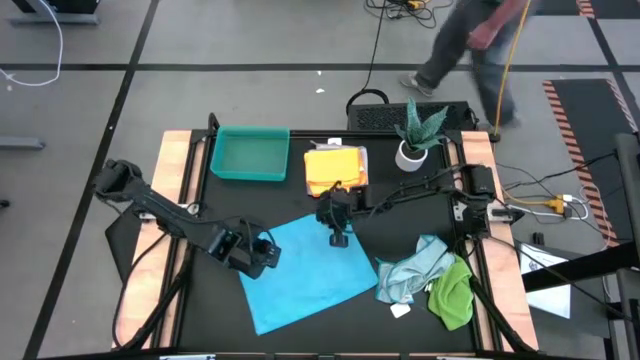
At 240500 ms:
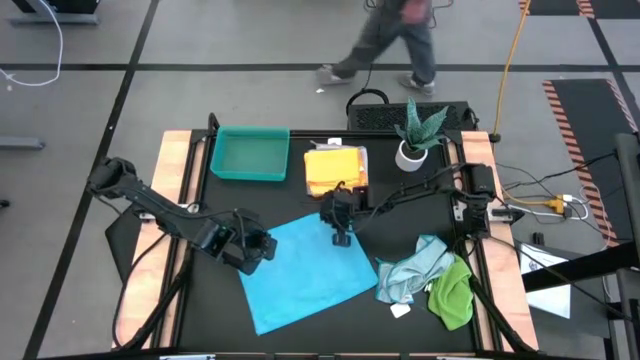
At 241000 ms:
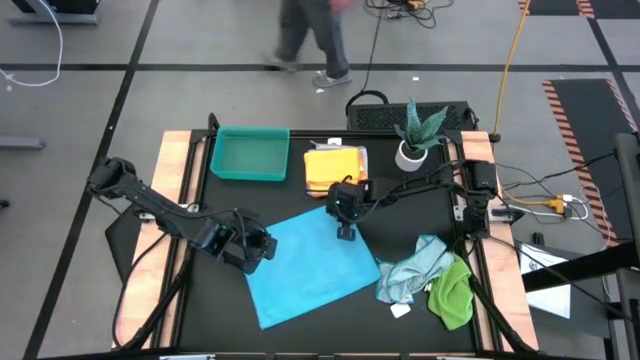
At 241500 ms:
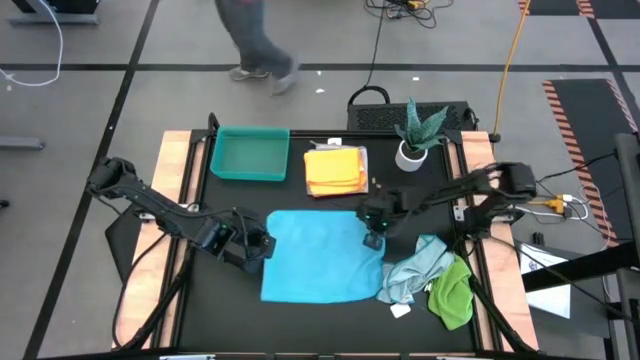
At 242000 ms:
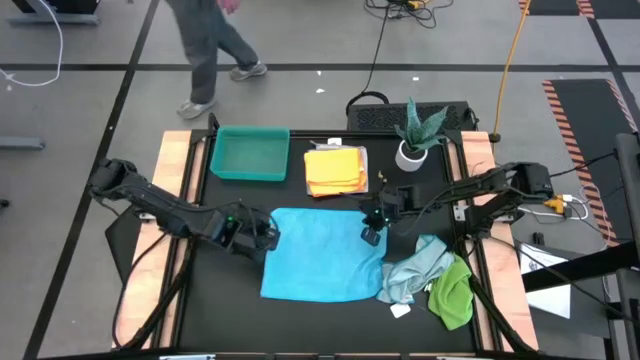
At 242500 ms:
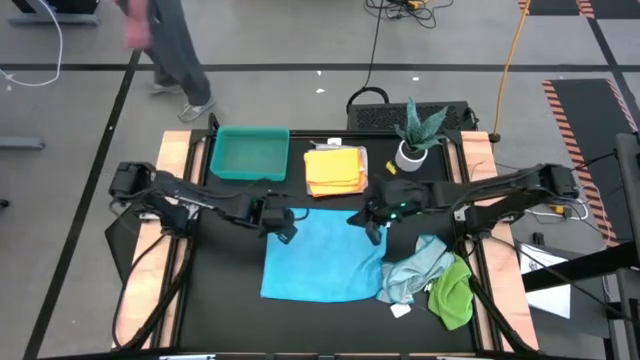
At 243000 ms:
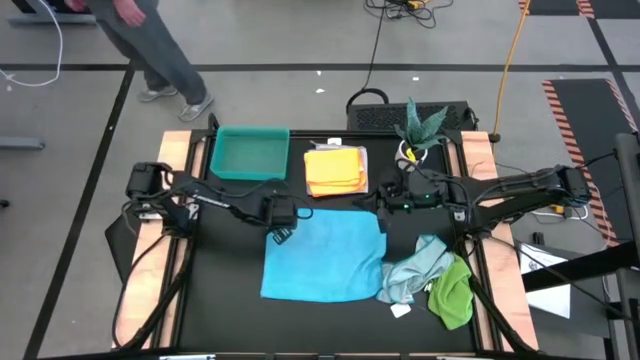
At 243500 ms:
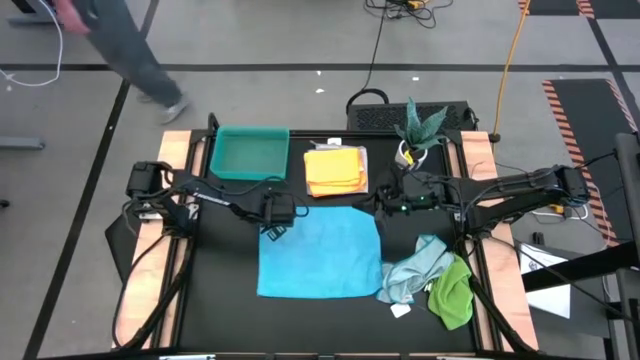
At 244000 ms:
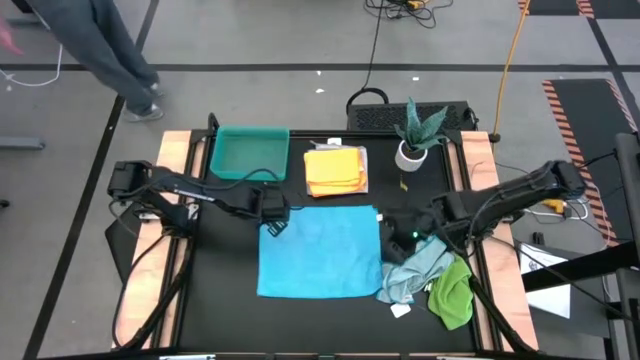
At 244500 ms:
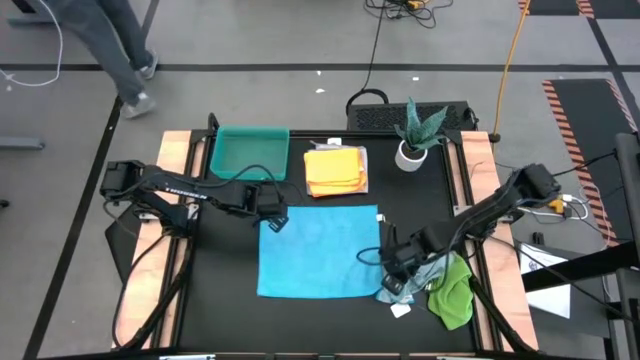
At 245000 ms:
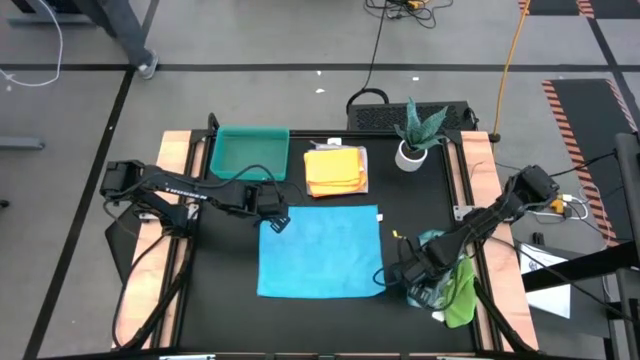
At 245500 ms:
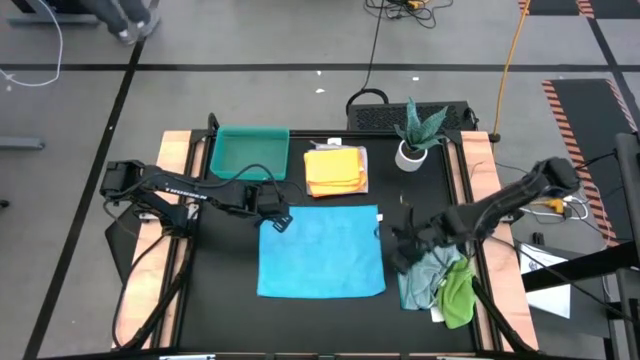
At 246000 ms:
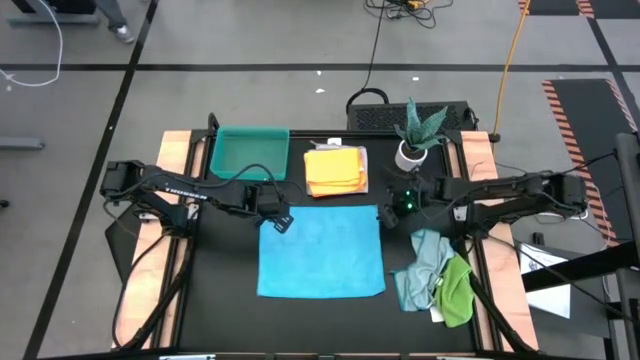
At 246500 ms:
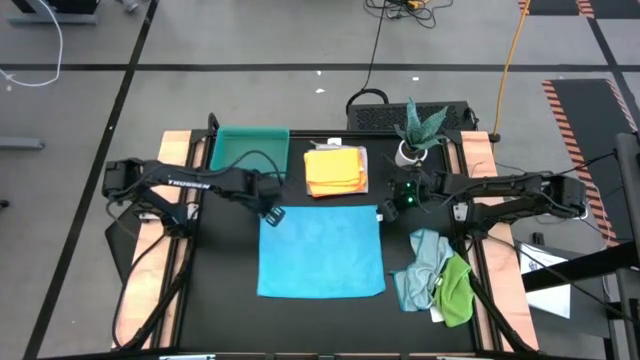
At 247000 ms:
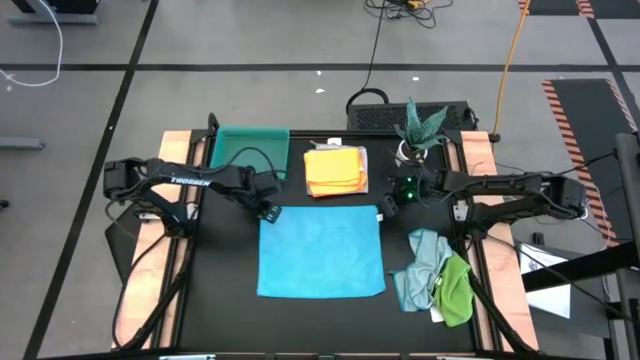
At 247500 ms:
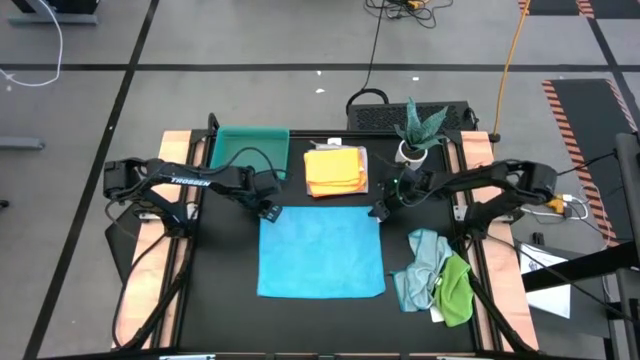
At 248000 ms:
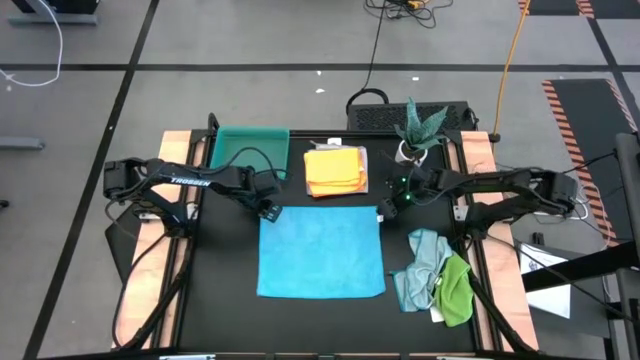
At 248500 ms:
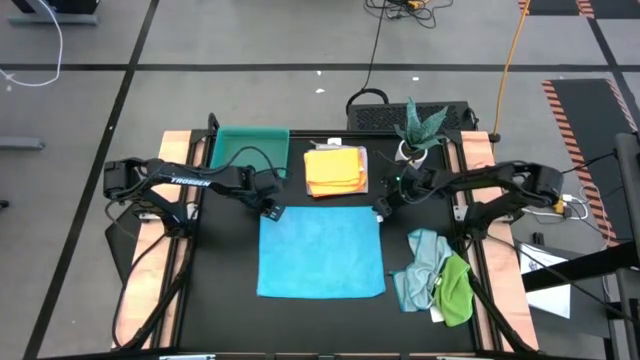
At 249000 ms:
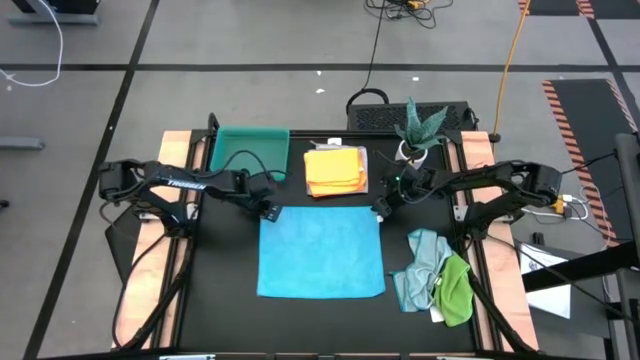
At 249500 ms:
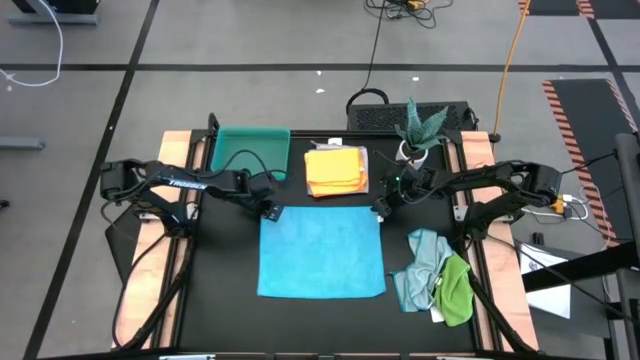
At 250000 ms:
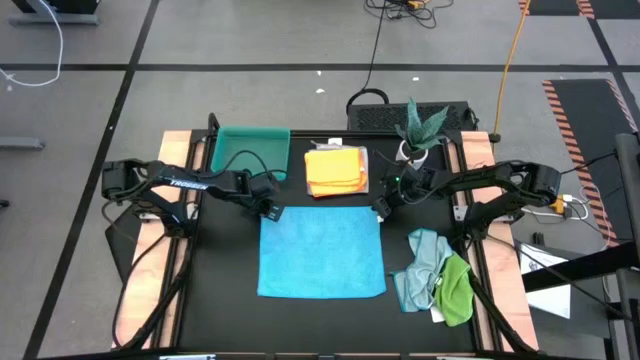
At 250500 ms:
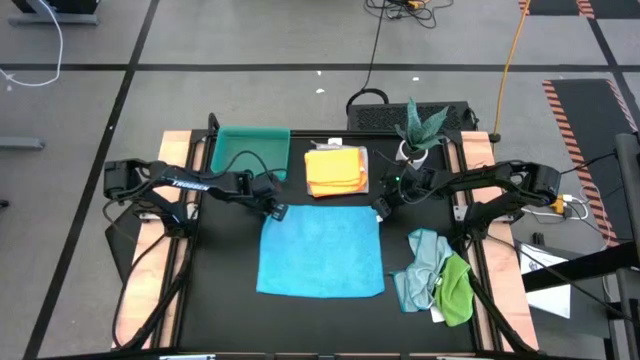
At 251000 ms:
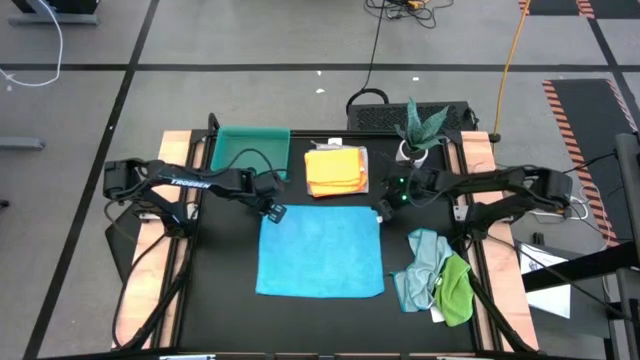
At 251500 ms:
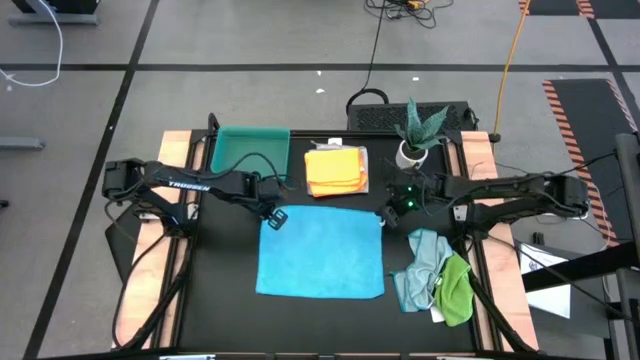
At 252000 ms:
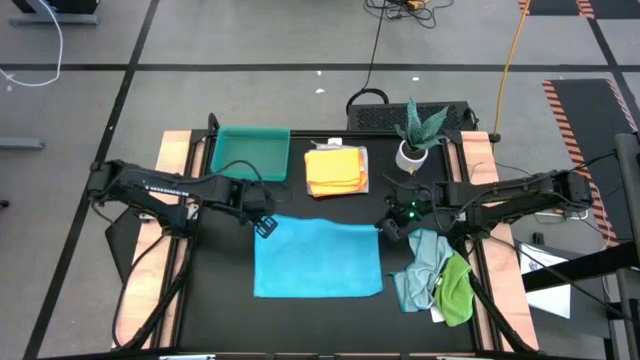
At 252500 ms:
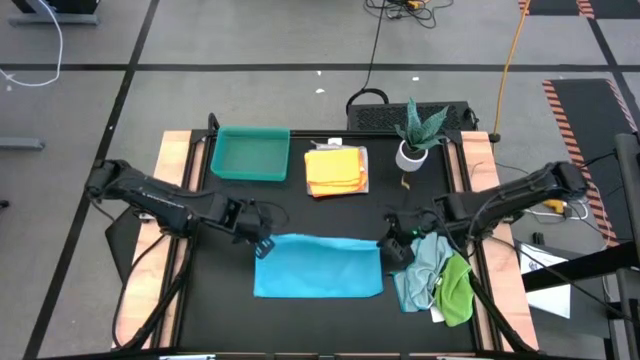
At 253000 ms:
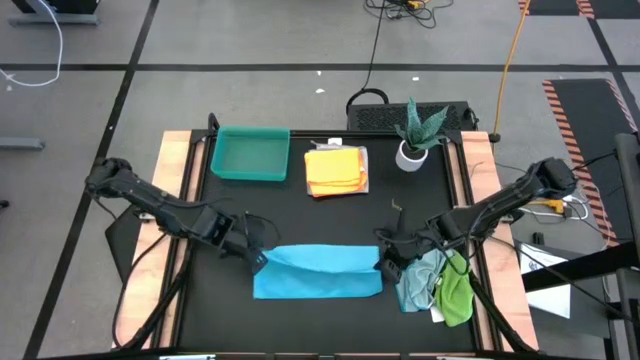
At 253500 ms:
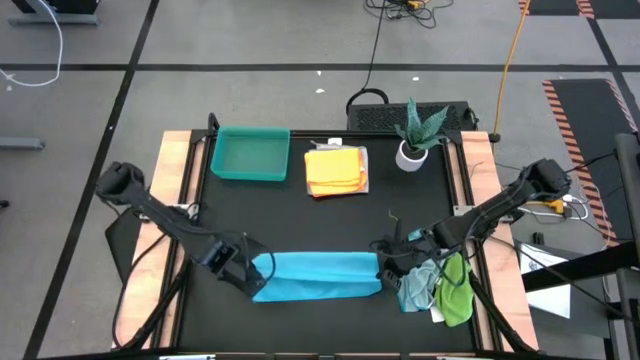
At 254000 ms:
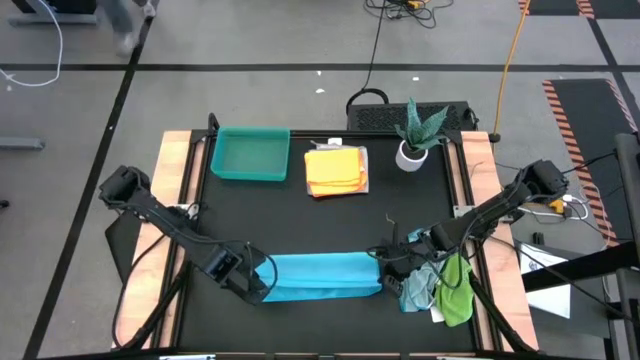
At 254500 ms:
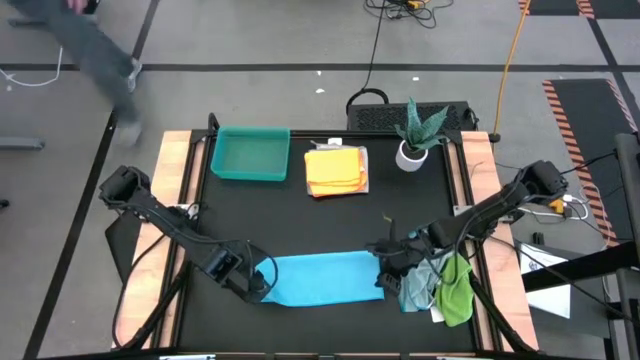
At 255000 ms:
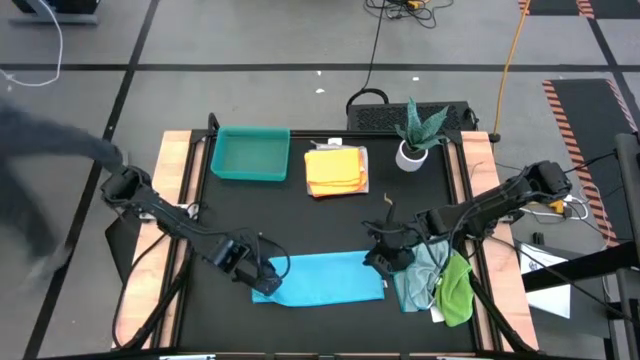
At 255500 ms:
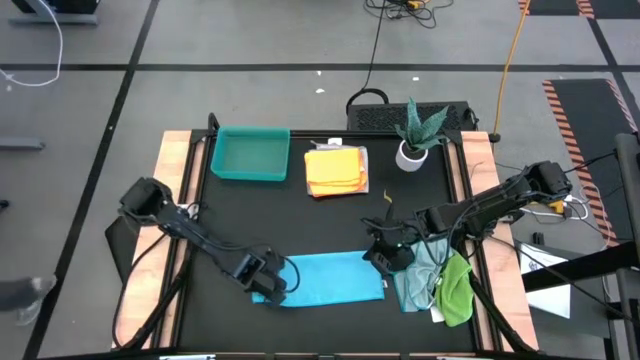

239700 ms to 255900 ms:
Task: Fold microfiber towels
Fold the blue microfiber towel

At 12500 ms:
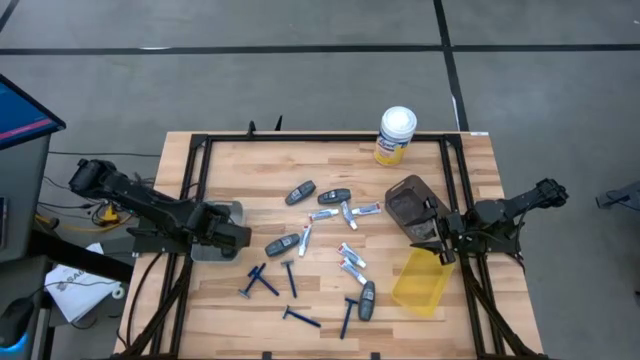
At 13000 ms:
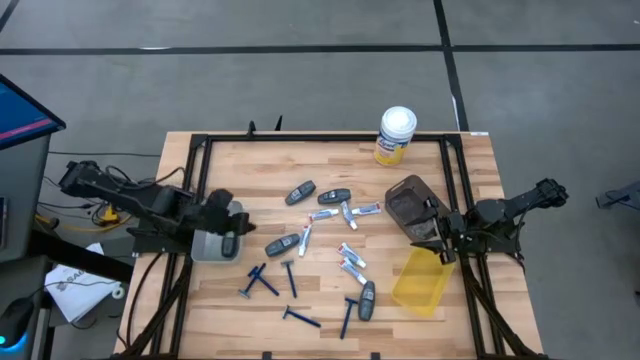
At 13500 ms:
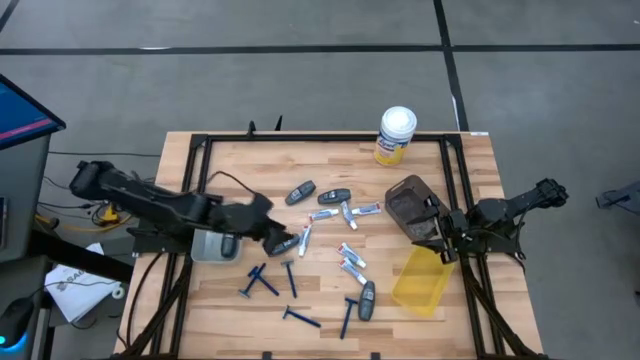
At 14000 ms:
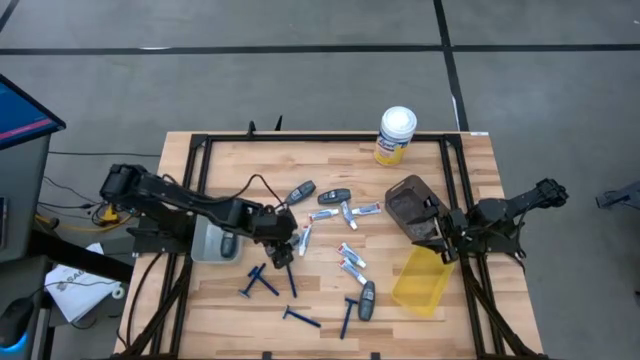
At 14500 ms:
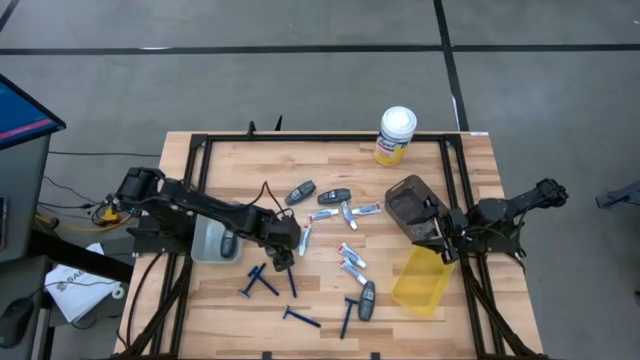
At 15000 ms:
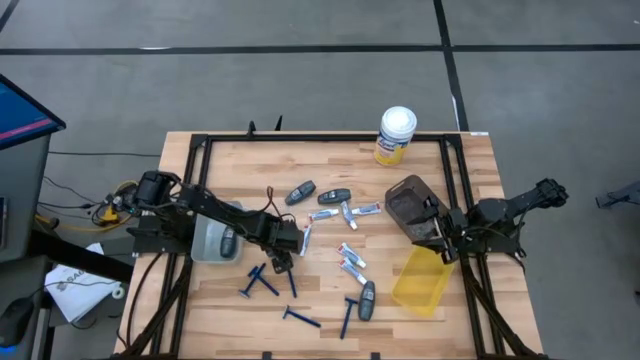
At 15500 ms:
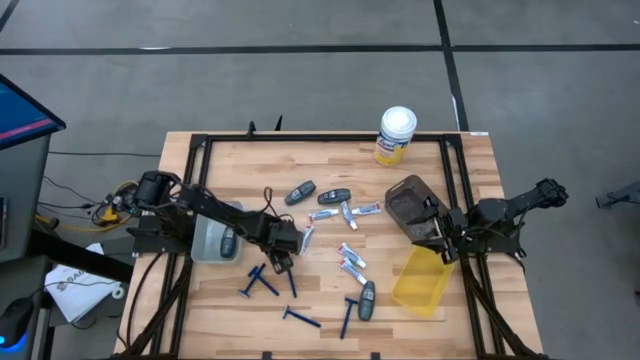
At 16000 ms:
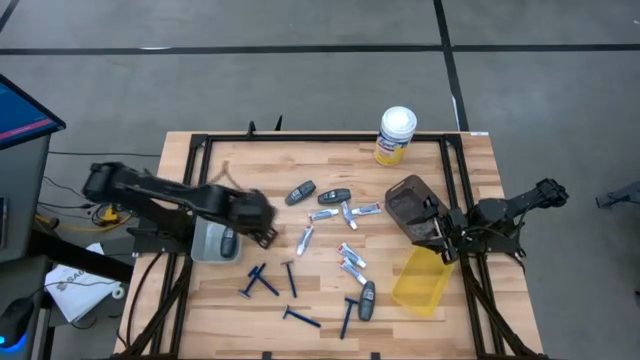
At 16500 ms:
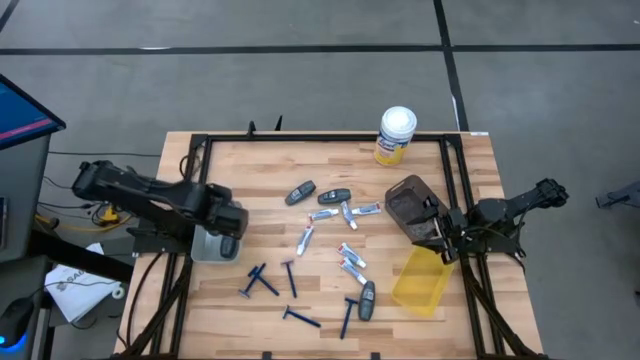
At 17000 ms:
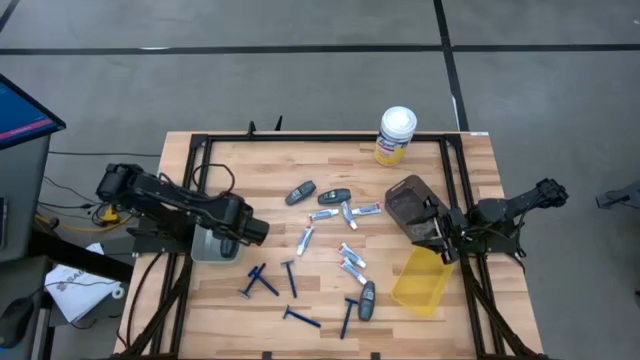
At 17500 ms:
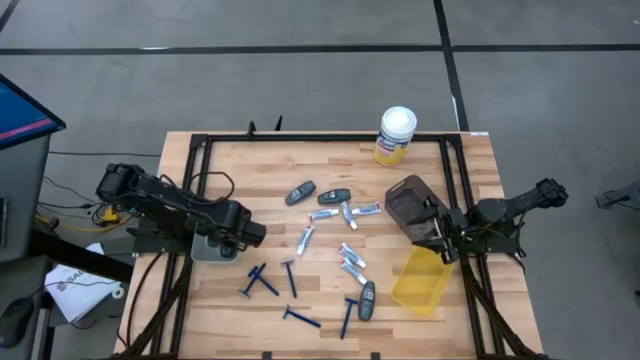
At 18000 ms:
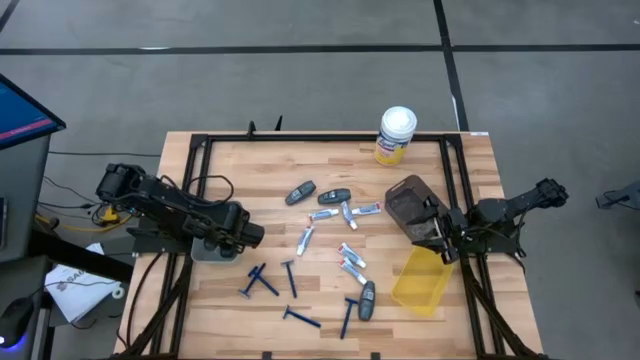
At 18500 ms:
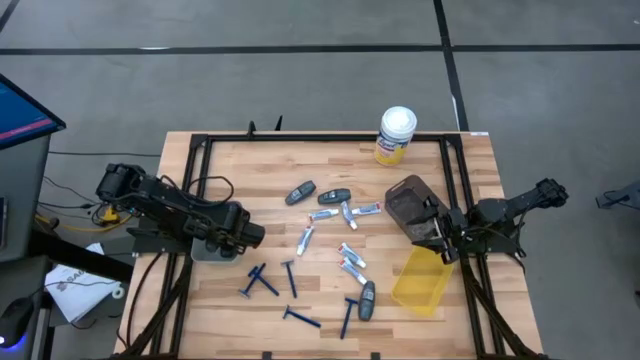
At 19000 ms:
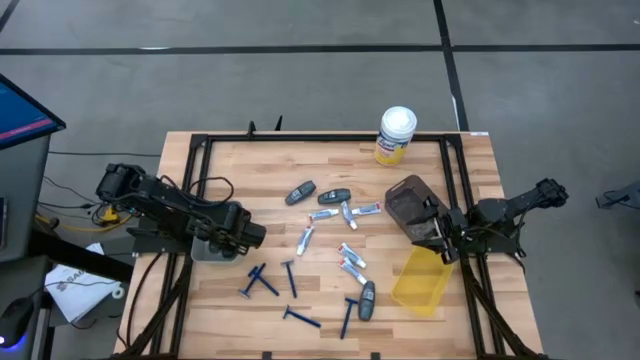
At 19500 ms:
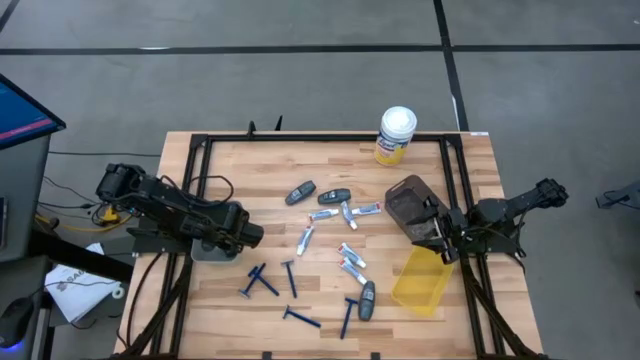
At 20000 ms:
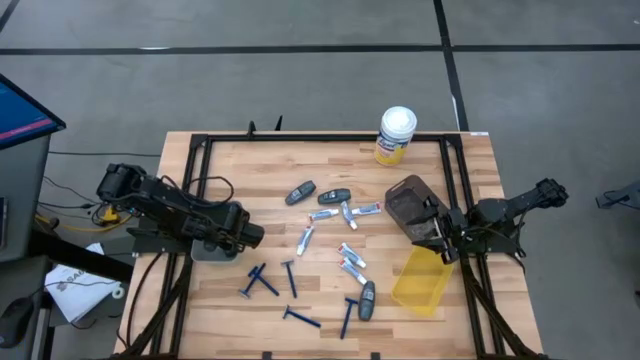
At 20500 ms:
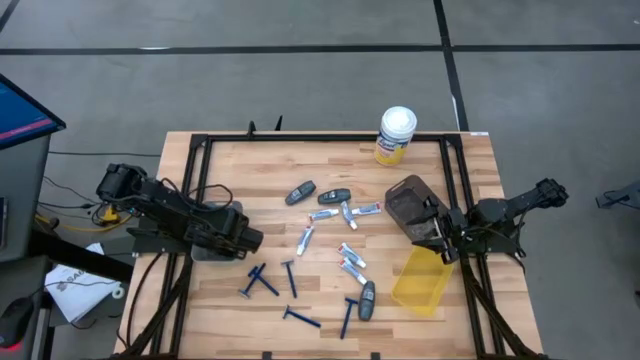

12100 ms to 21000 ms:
Task: Pick & Place Travel size toiletries
Put the gray deodorant into the gray bin
